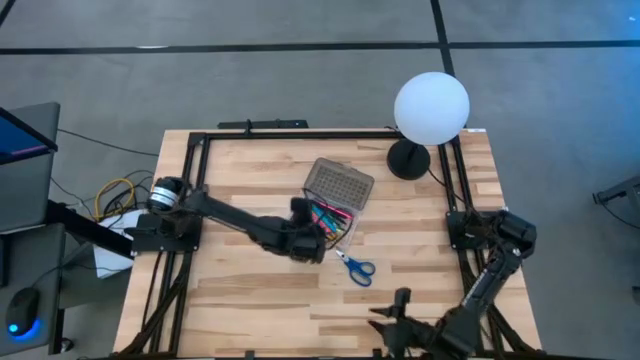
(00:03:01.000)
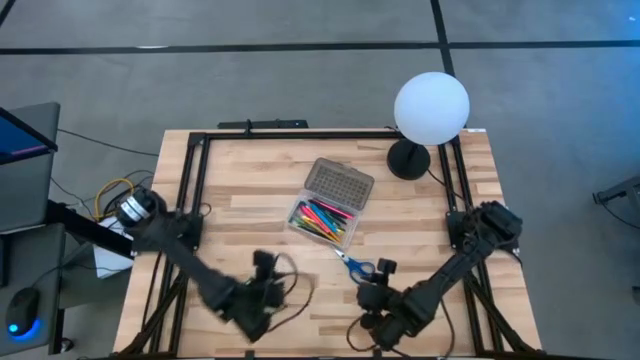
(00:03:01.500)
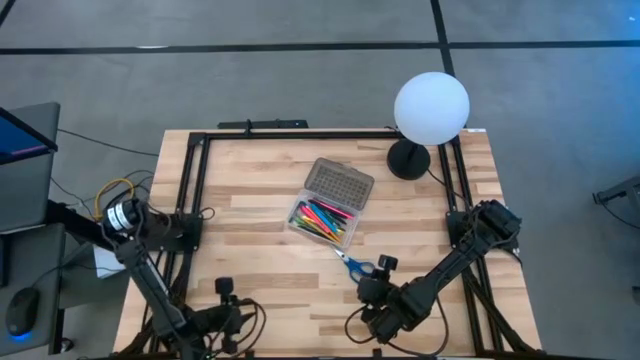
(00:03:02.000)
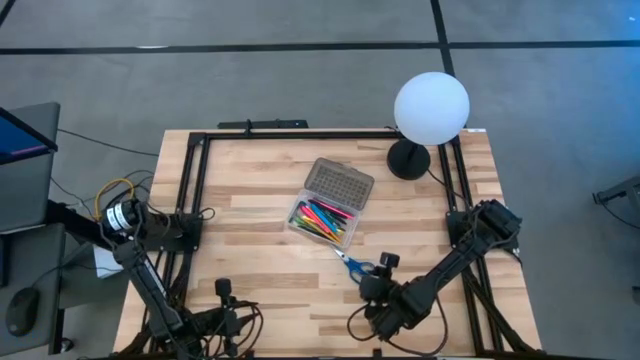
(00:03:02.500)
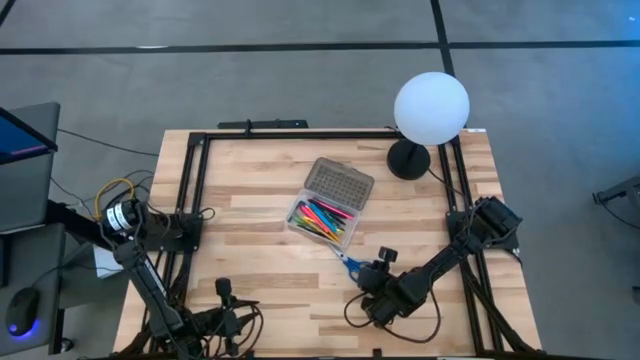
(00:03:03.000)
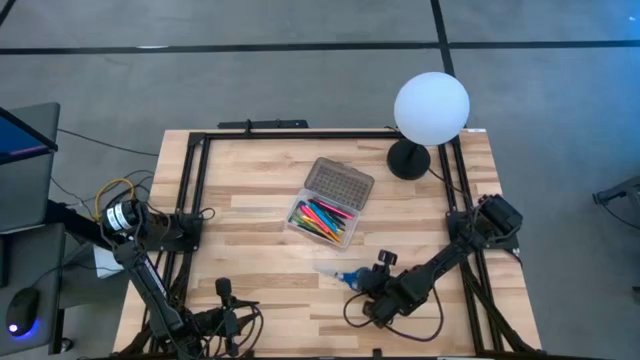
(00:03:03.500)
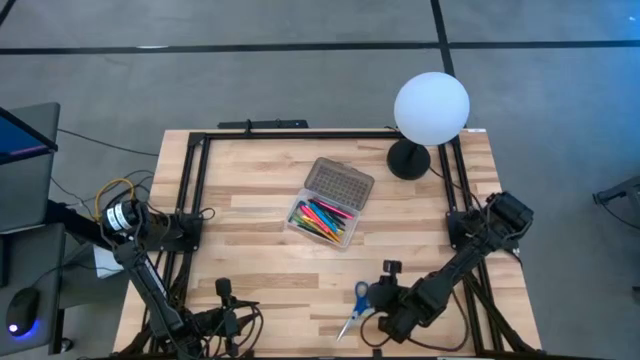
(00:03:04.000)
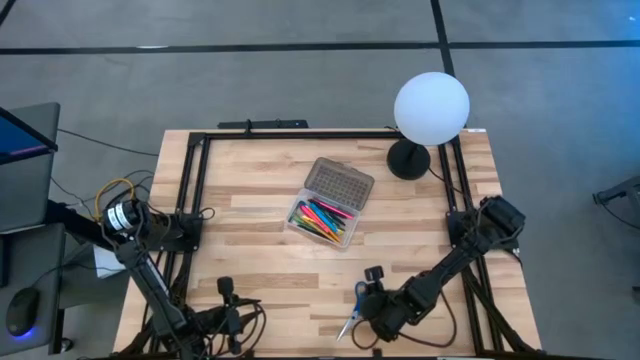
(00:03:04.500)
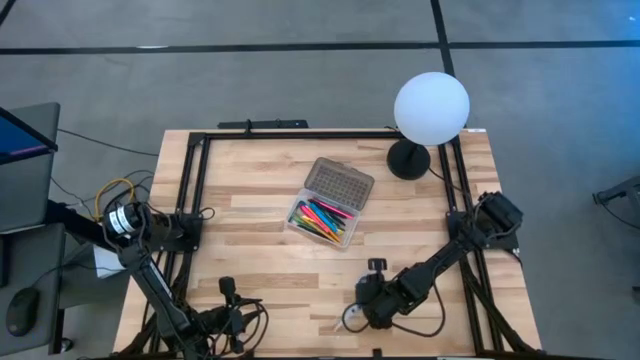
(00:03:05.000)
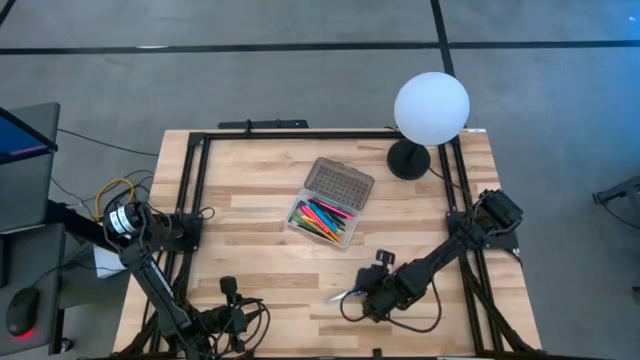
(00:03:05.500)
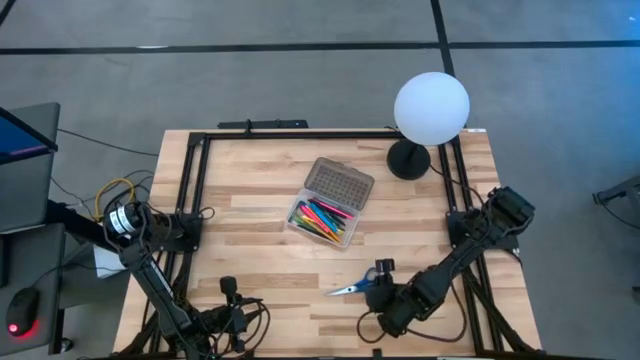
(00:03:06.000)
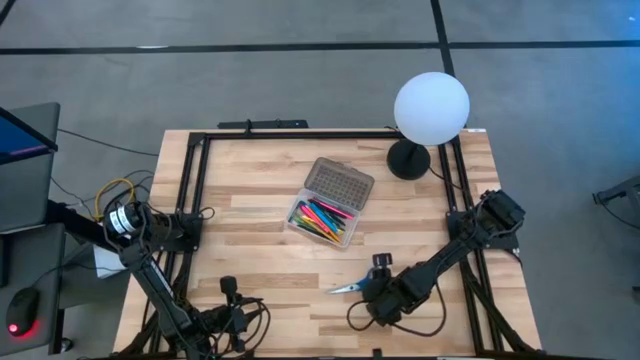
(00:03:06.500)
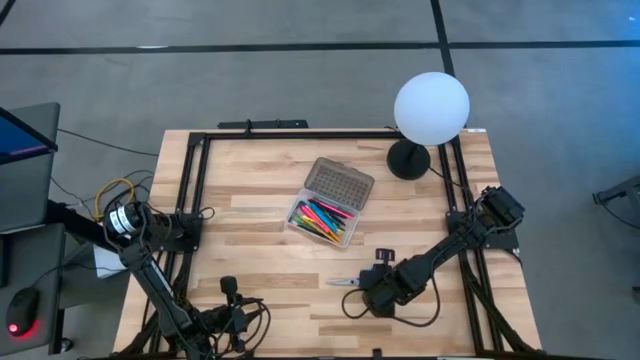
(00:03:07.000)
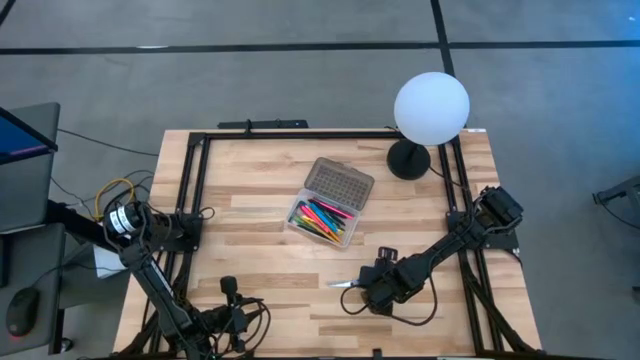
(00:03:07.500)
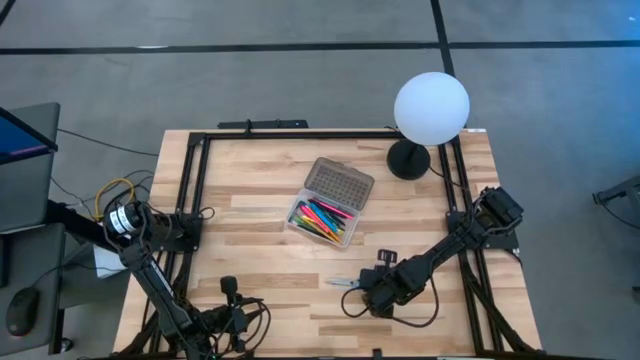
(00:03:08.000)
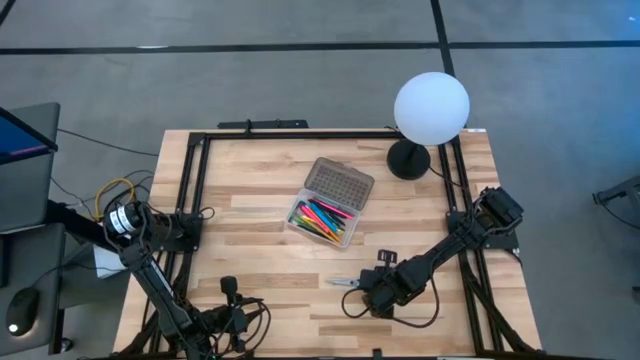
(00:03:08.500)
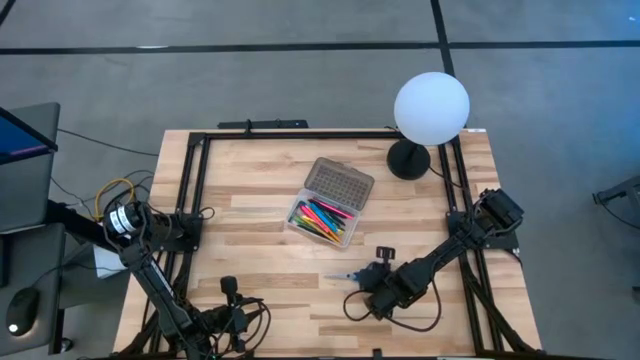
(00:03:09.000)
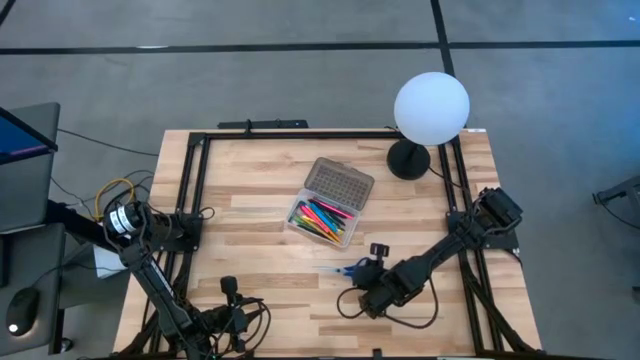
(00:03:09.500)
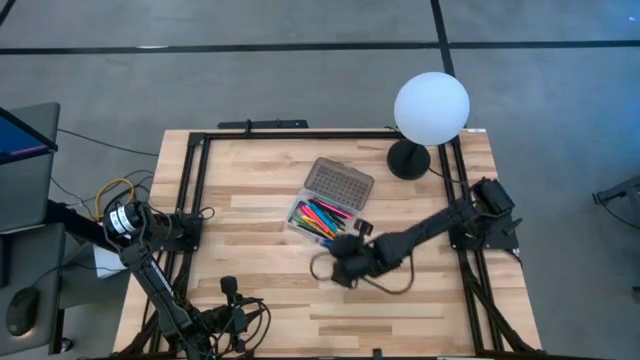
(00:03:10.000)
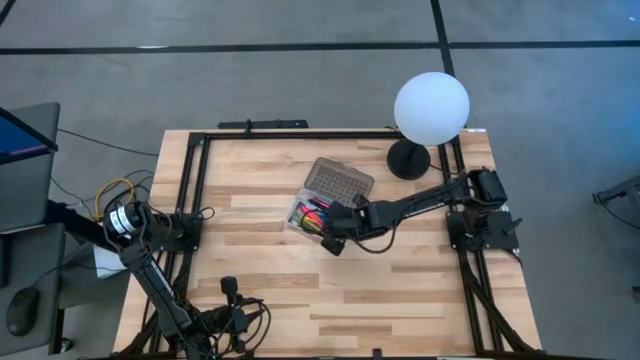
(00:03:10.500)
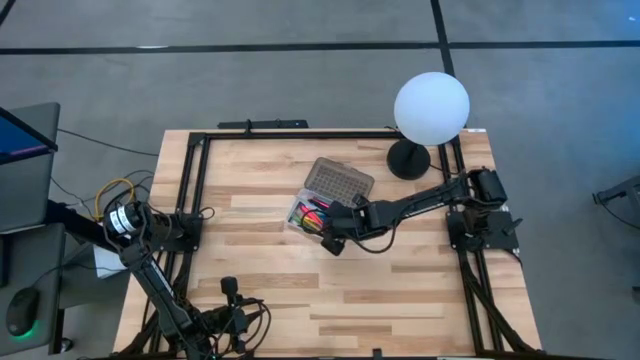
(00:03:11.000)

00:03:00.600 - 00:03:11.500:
Task: Pick & place school supplies into a supply box
Put the blue scissors into the gray supply box

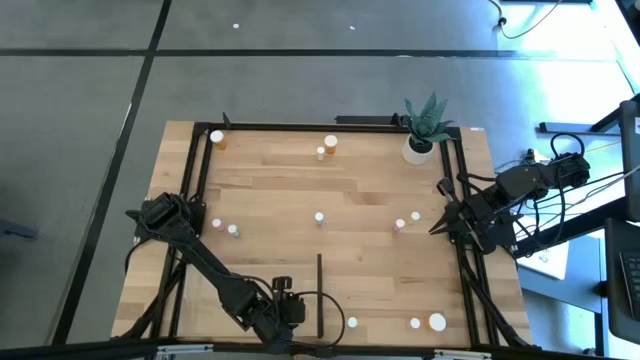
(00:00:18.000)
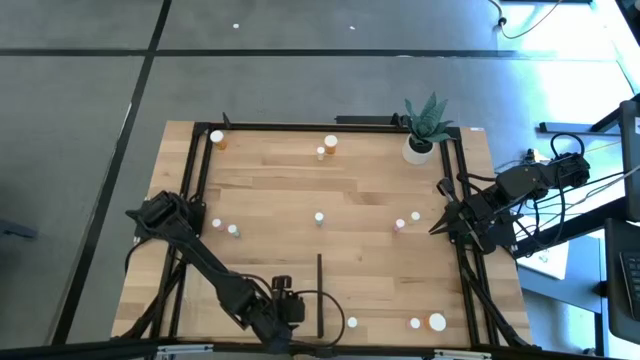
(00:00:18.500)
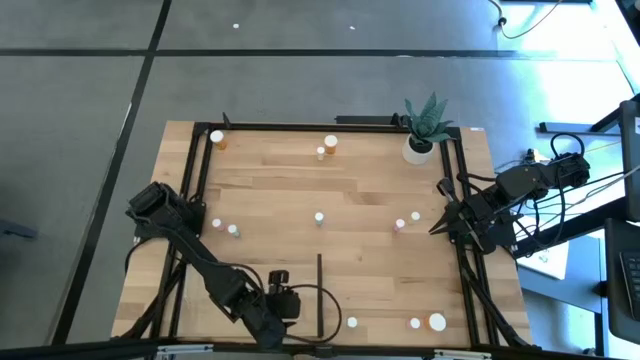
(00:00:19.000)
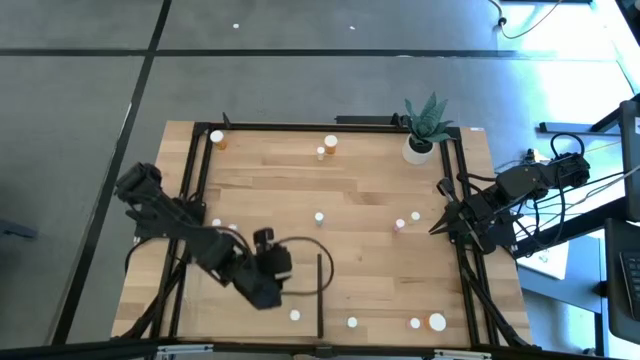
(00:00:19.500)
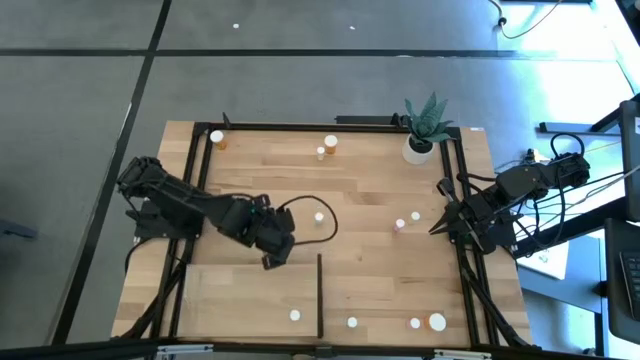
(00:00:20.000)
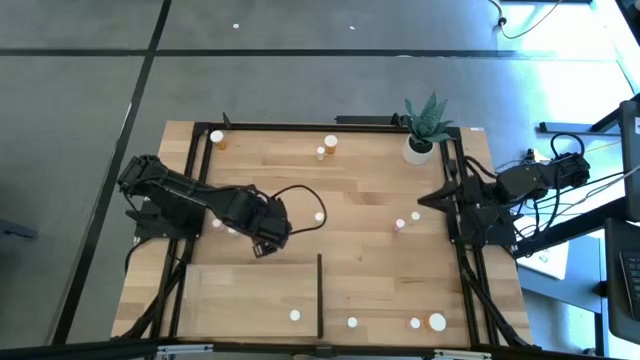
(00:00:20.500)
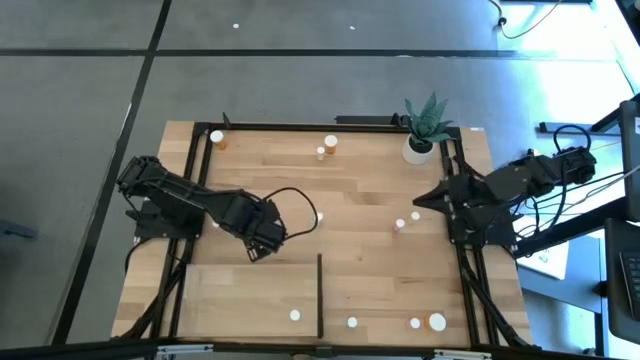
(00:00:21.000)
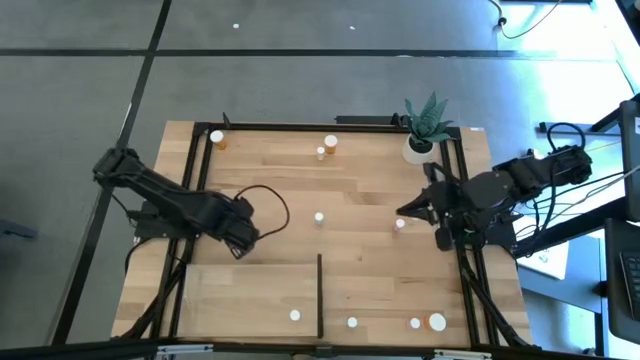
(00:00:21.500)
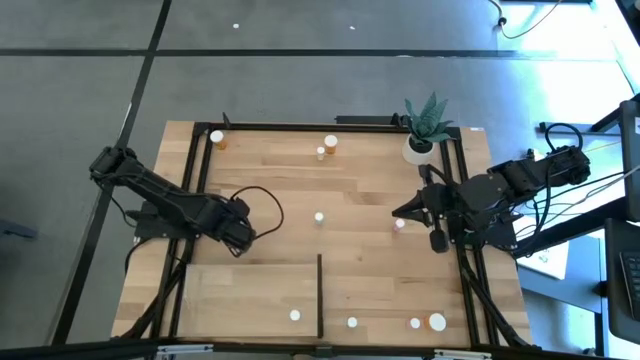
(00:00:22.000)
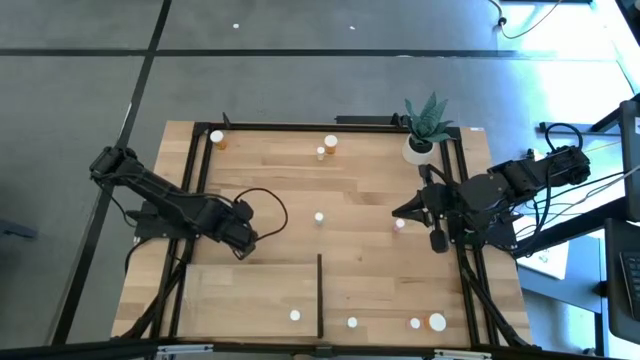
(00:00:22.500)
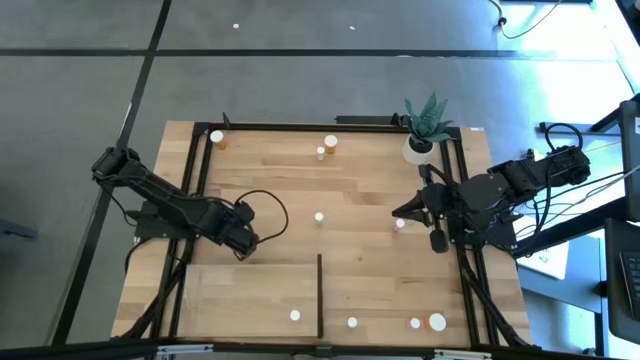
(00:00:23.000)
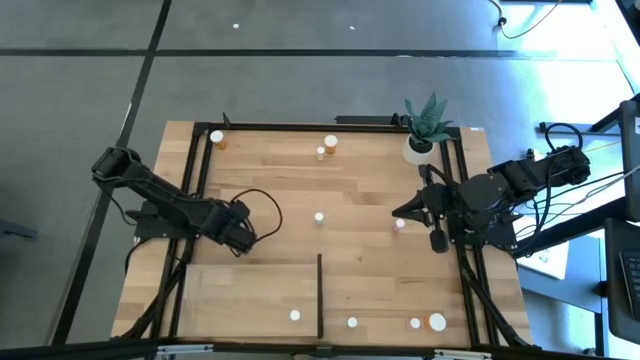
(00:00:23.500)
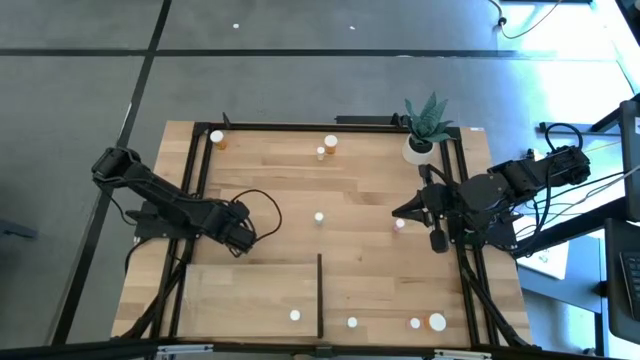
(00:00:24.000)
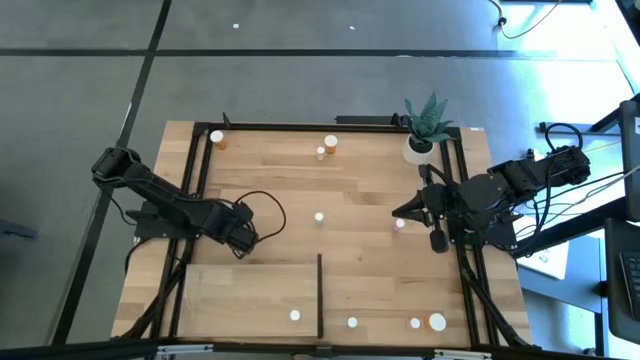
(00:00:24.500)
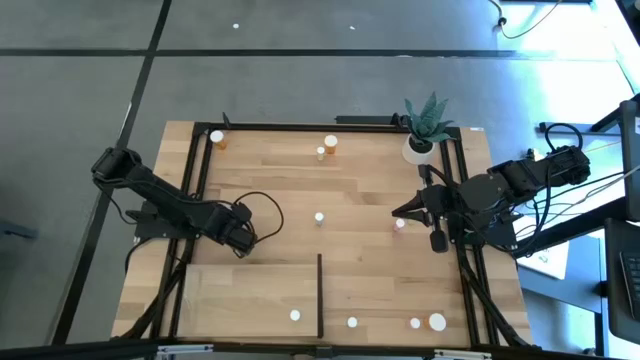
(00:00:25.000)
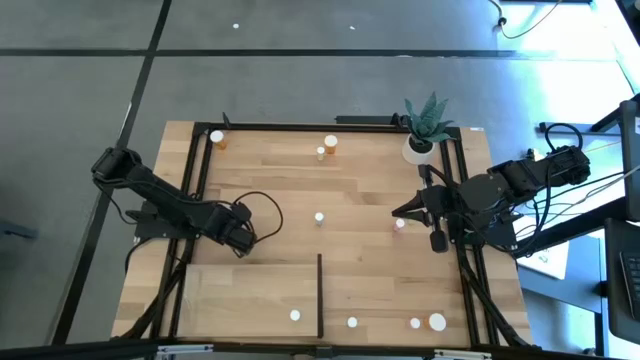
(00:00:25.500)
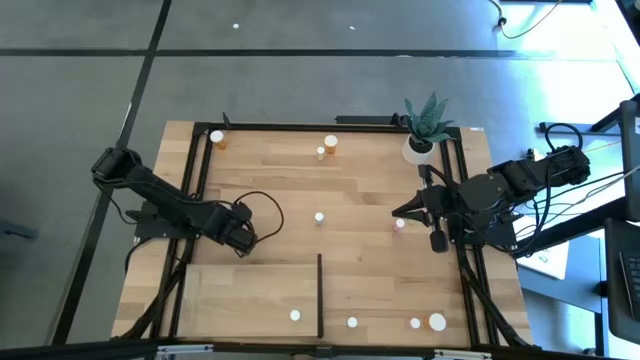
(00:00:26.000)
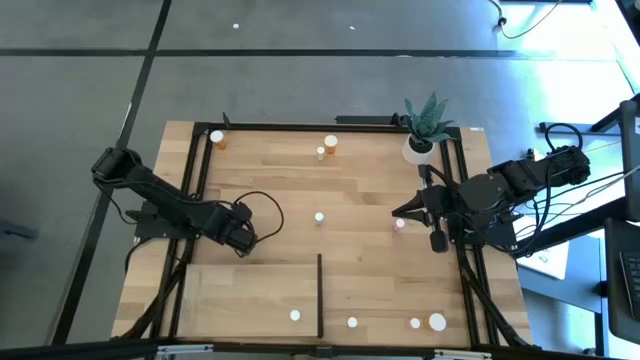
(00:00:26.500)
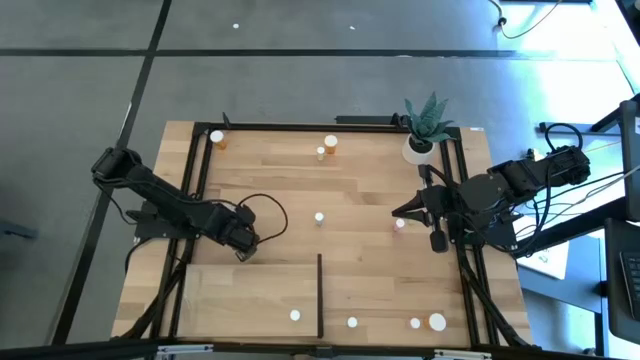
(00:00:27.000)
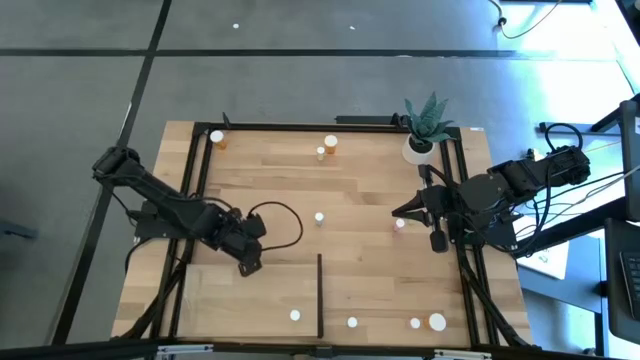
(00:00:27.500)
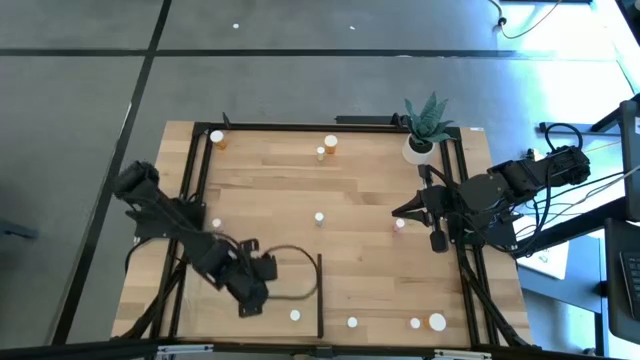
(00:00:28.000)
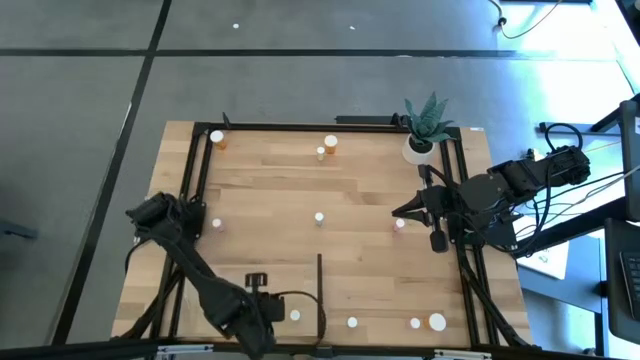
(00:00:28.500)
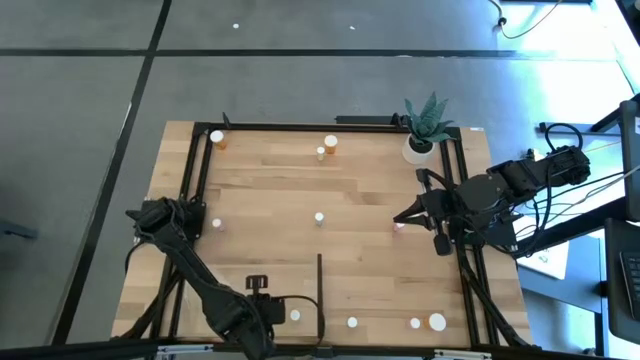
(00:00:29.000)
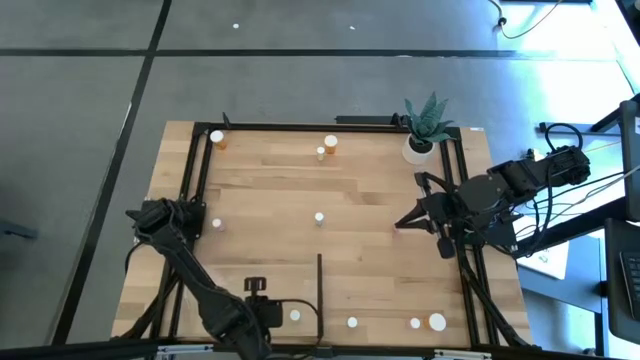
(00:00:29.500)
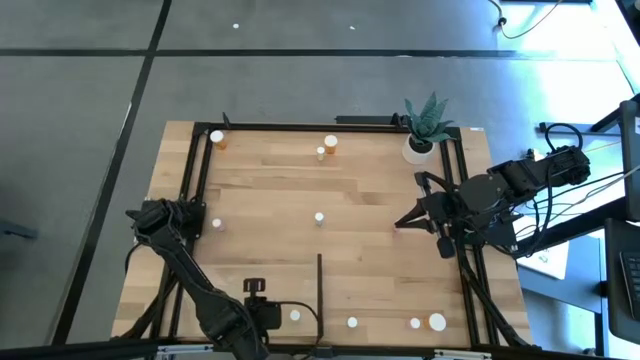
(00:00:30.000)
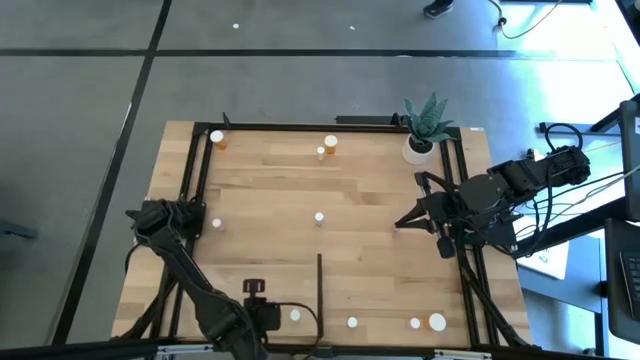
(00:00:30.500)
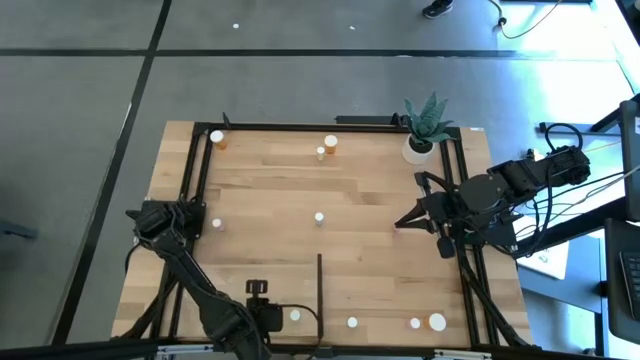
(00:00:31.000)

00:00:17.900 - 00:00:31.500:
Task: Pick and place medicine bottles onto shelf by color
Put the left blue pill bottle on the shelf
